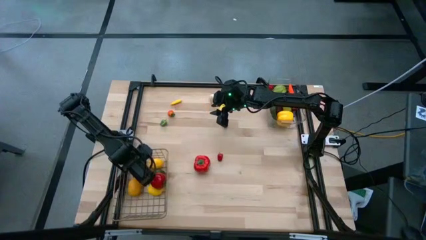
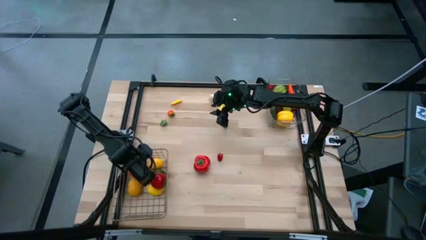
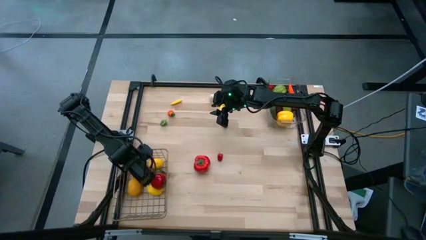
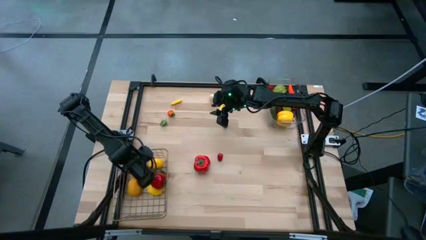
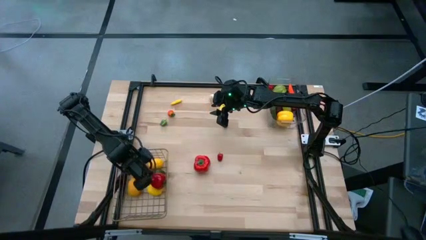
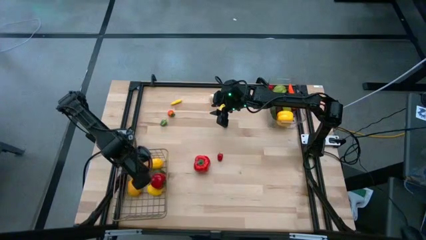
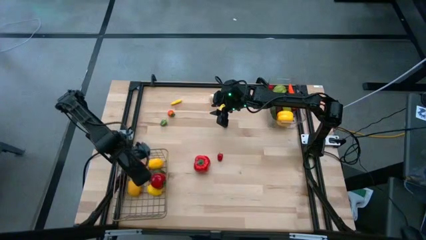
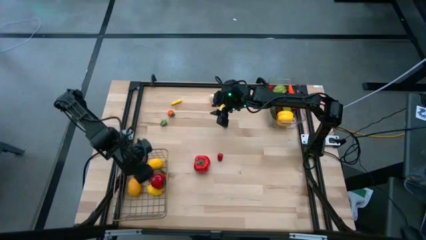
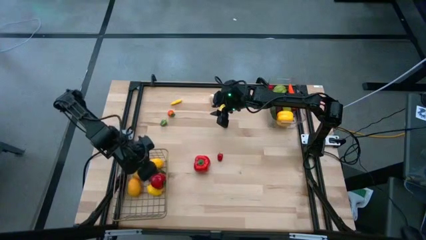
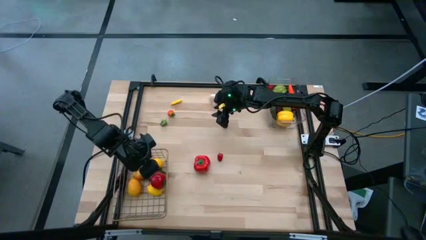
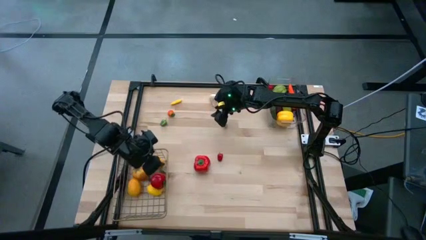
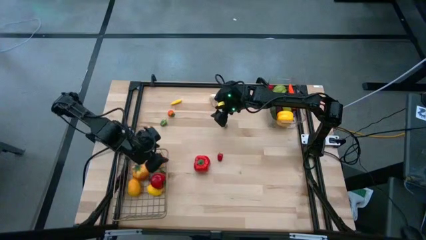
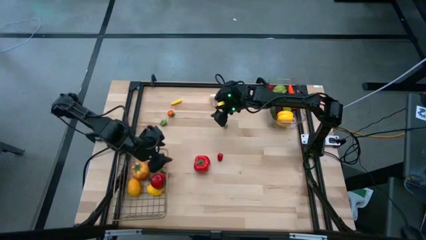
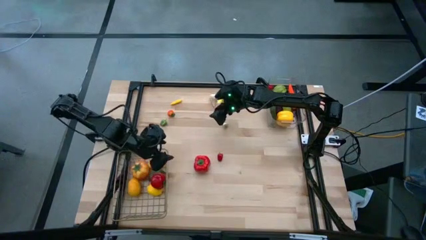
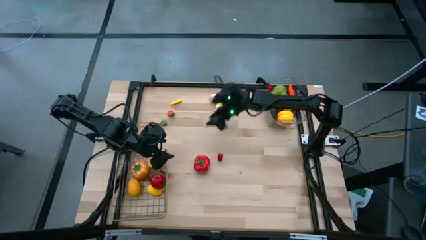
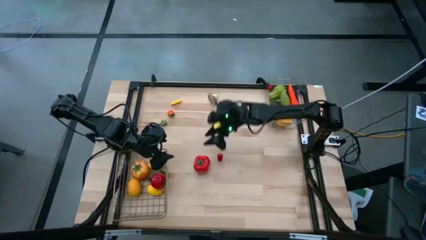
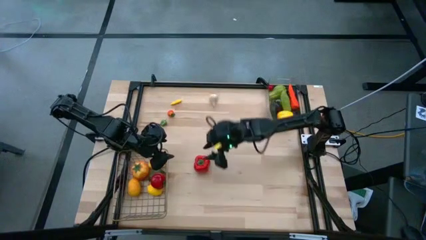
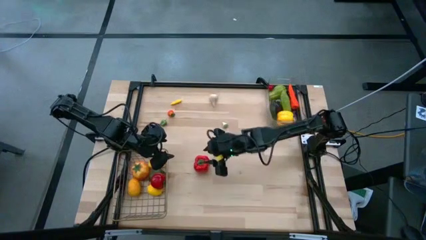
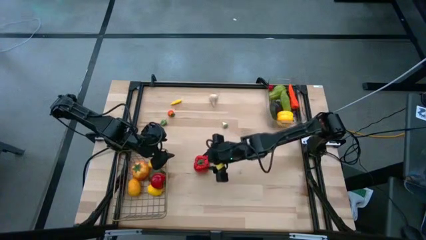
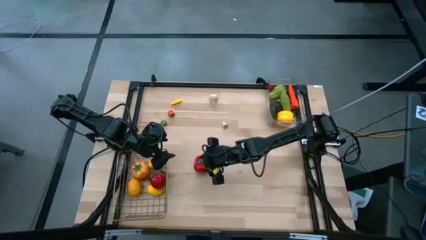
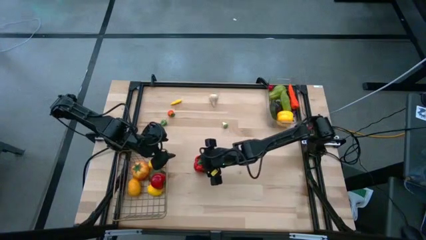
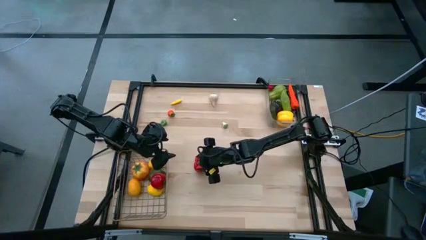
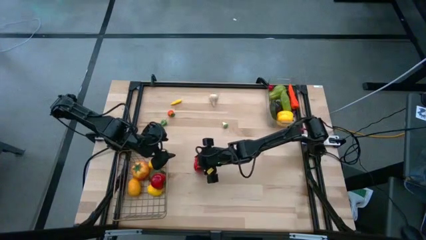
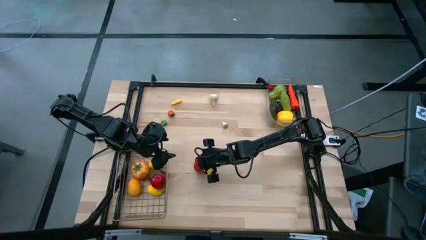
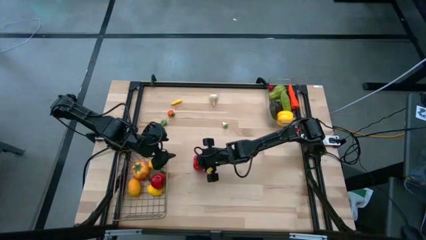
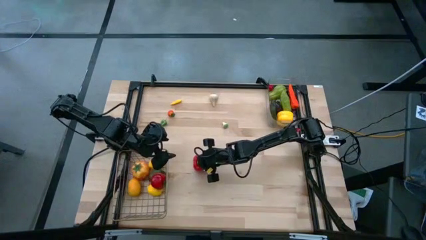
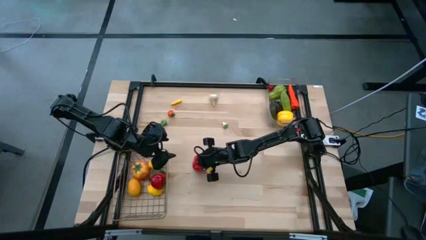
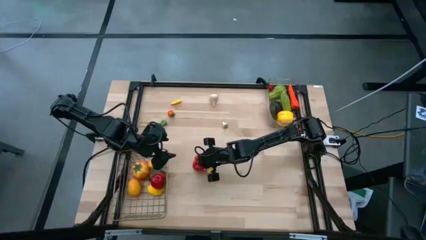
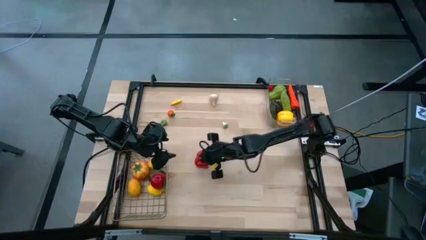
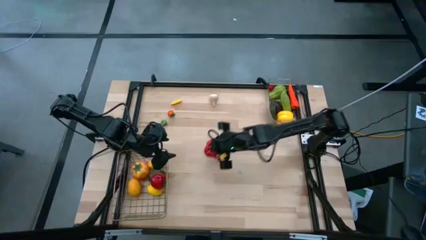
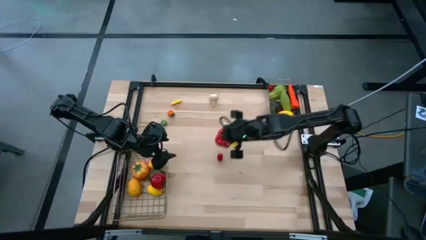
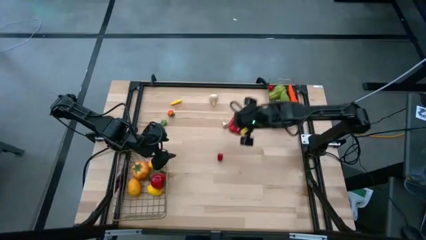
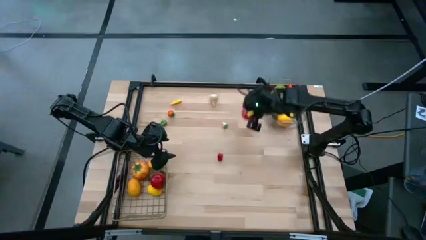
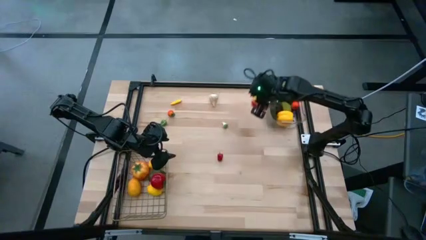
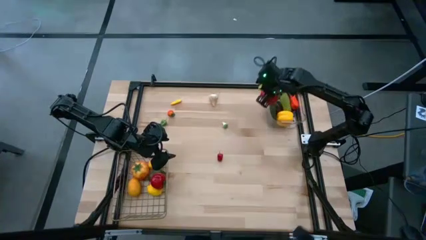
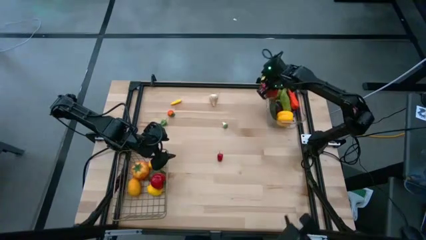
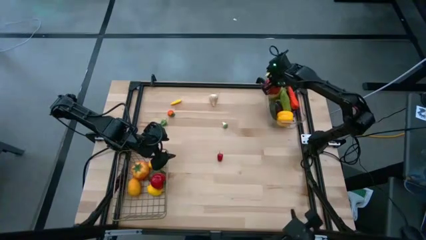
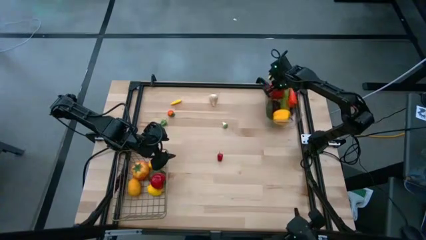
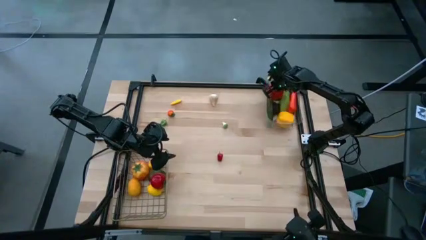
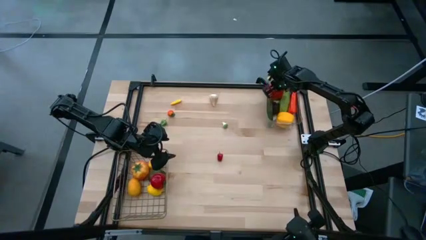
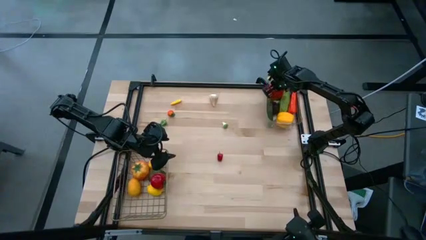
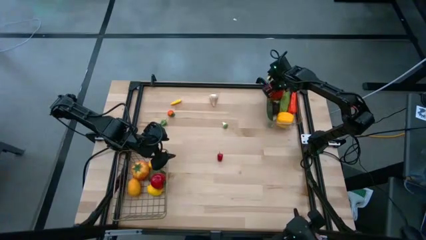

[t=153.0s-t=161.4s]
Task: Sort produce into baskets
Put the red bell pepper into the transparent bin

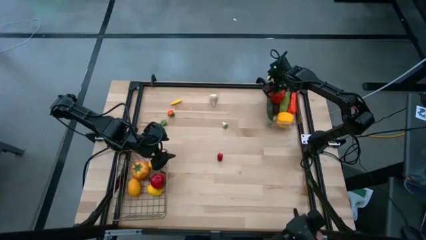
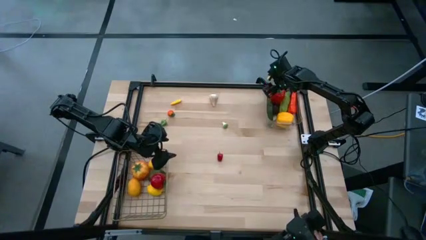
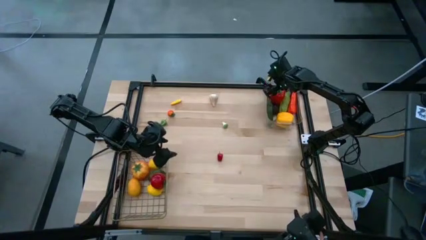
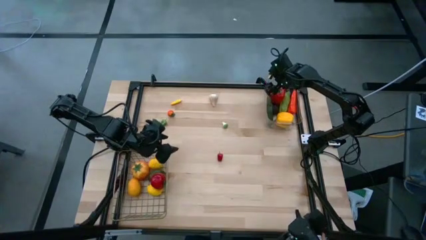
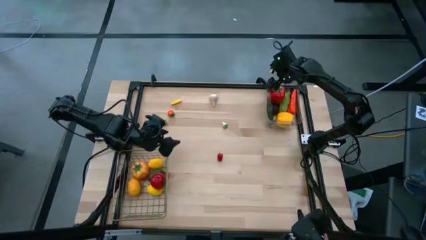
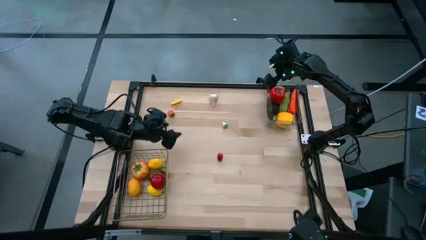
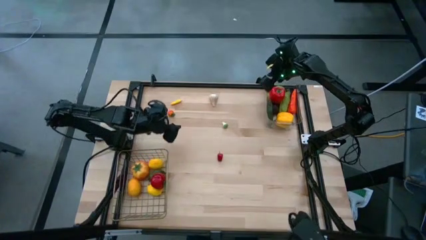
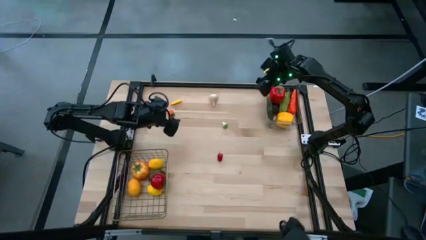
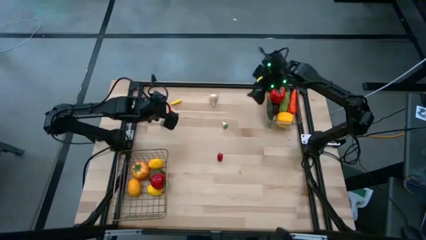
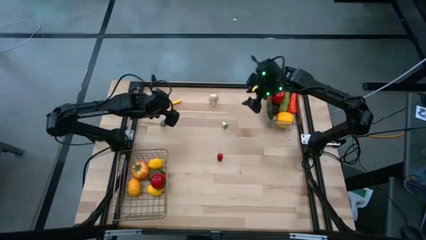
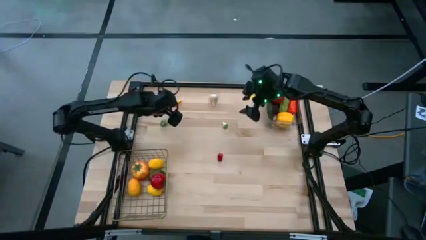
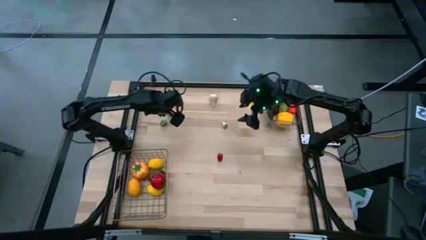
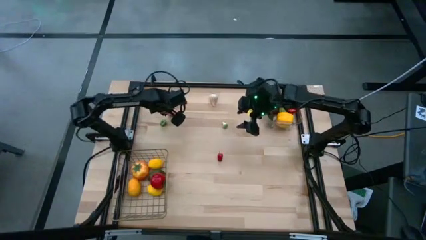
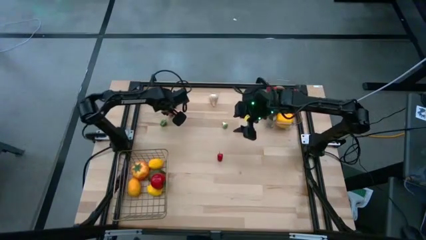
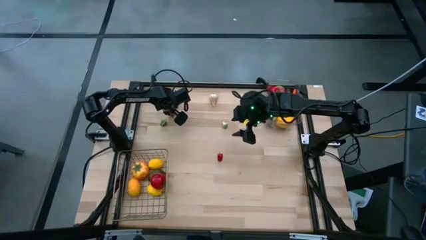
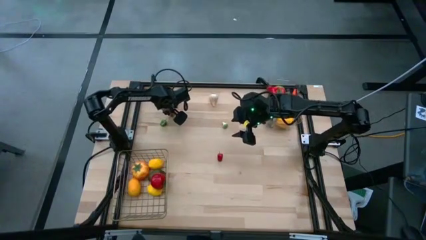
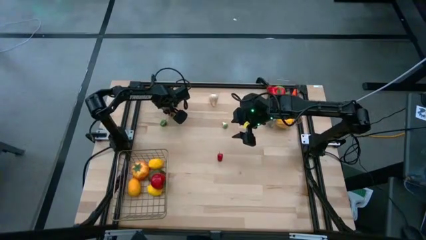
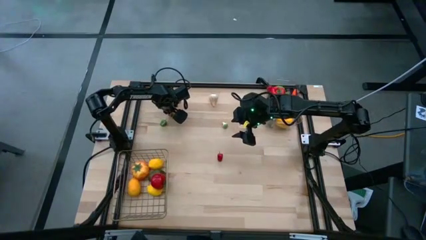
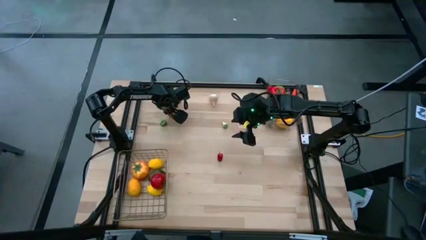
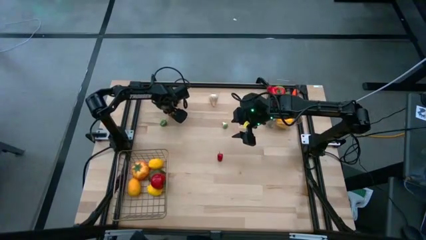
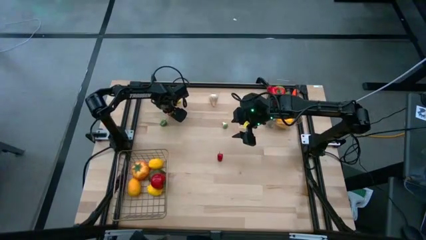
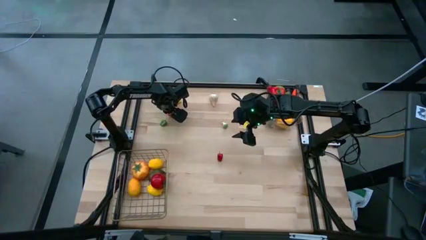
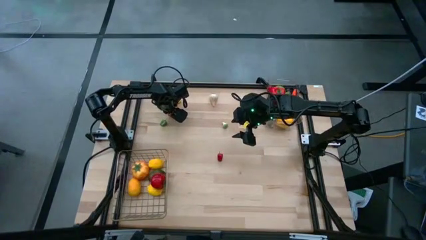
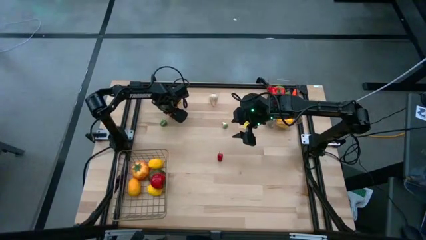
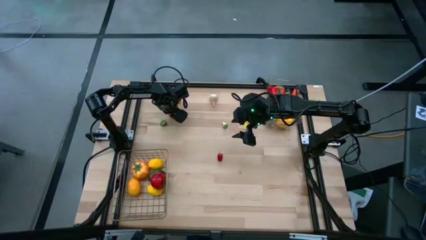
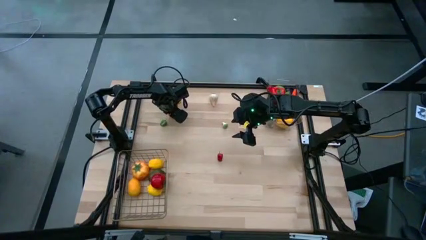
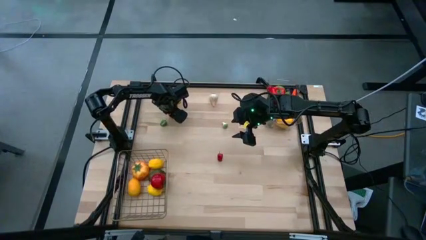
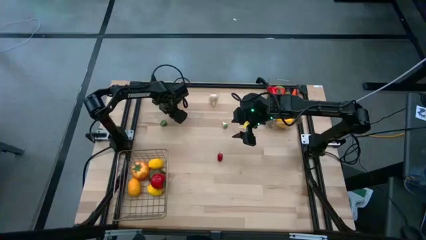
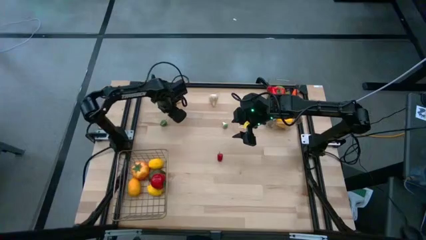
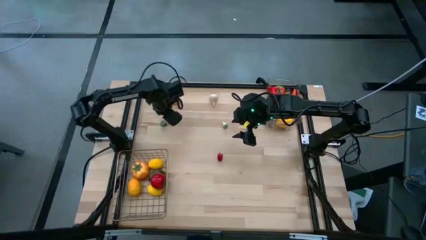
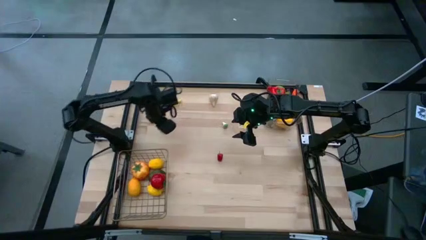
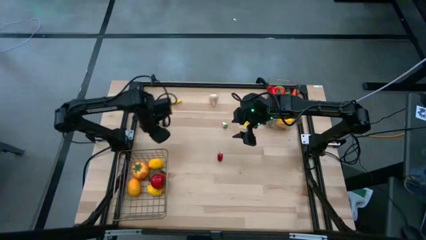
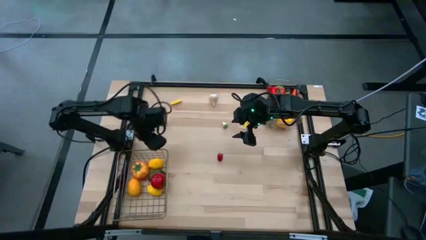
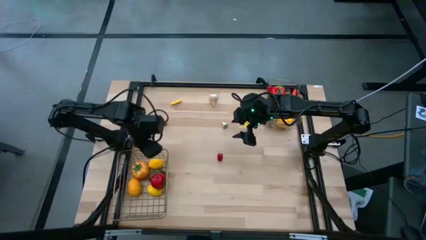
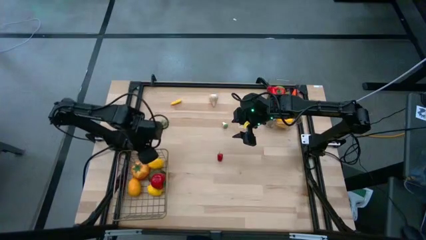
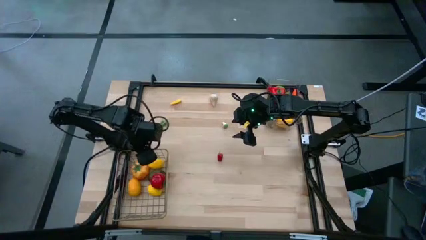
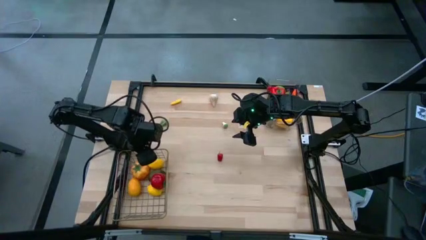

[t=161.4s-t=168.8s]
Put the peach into the wire basket
